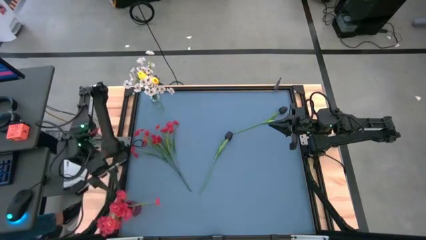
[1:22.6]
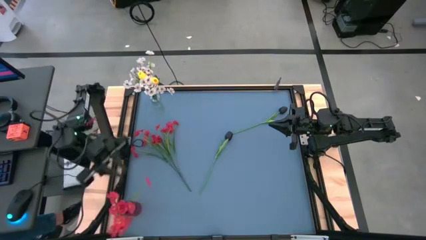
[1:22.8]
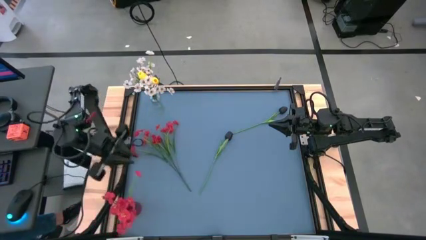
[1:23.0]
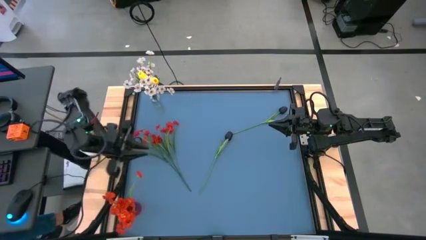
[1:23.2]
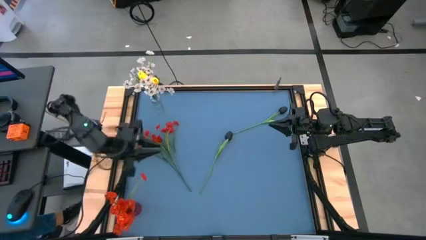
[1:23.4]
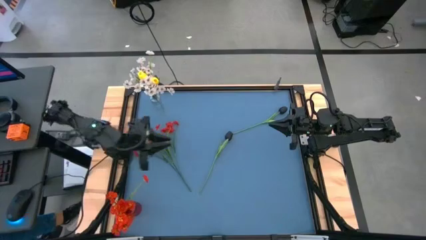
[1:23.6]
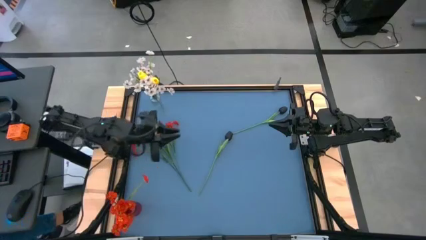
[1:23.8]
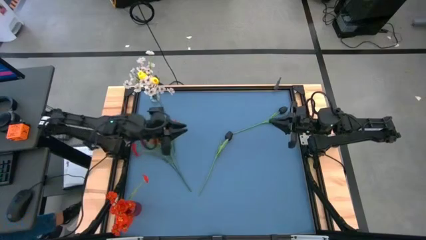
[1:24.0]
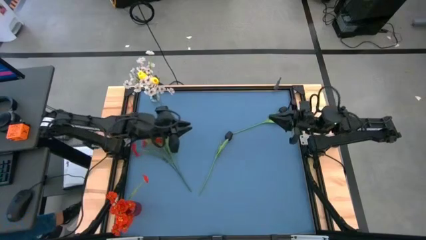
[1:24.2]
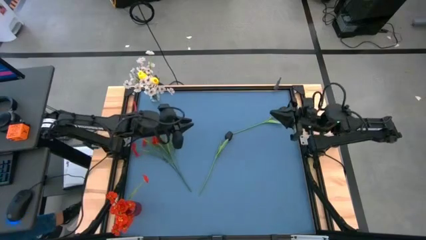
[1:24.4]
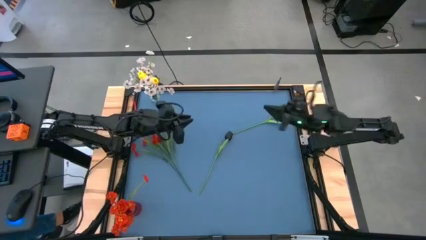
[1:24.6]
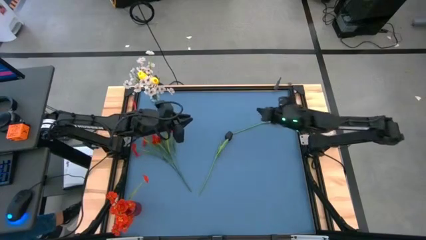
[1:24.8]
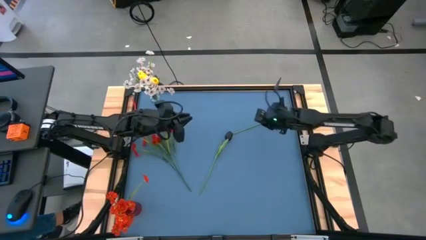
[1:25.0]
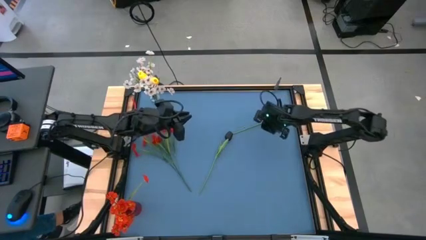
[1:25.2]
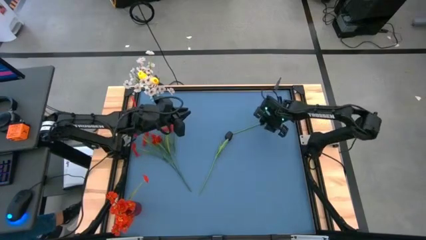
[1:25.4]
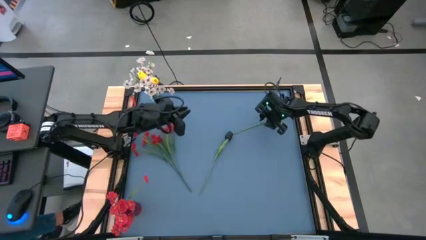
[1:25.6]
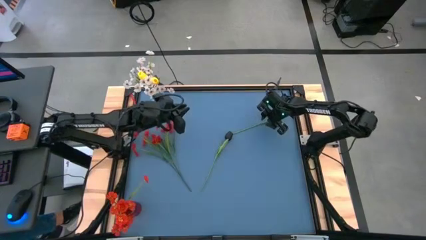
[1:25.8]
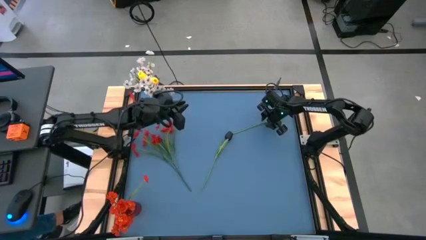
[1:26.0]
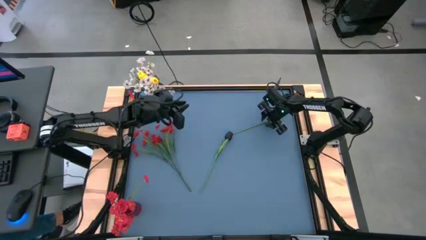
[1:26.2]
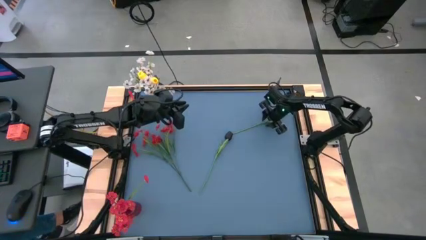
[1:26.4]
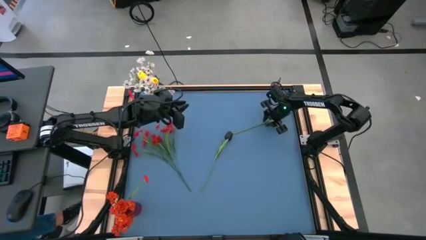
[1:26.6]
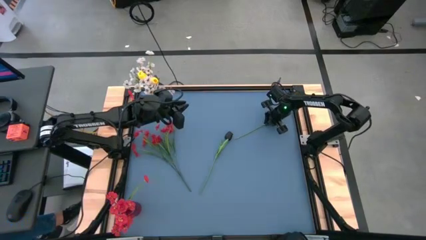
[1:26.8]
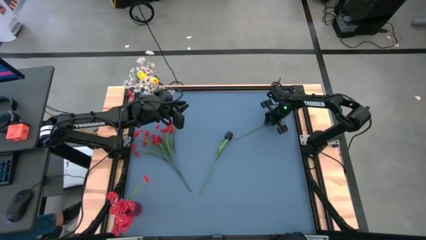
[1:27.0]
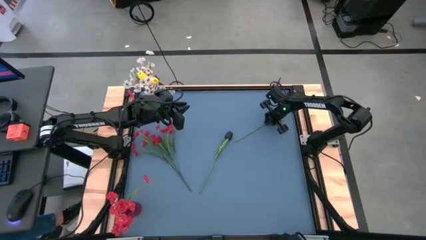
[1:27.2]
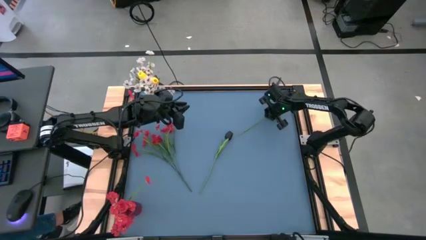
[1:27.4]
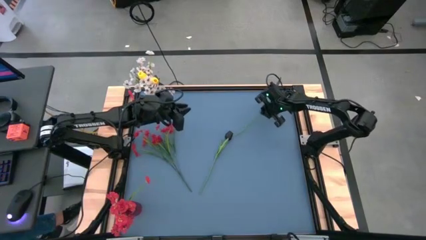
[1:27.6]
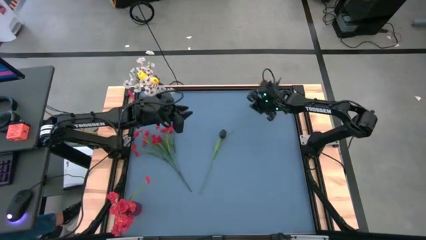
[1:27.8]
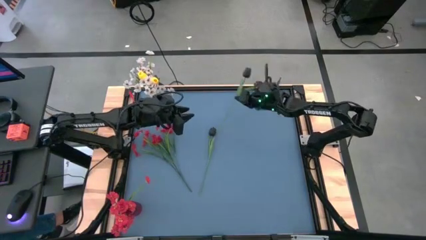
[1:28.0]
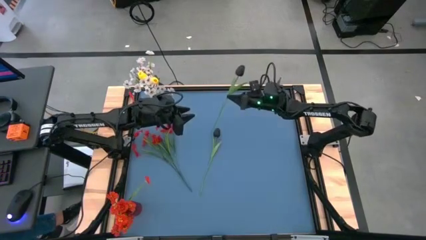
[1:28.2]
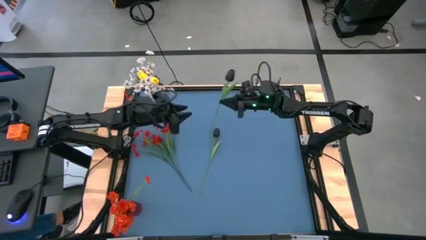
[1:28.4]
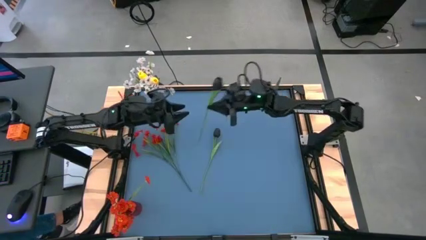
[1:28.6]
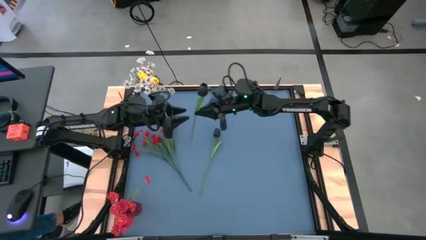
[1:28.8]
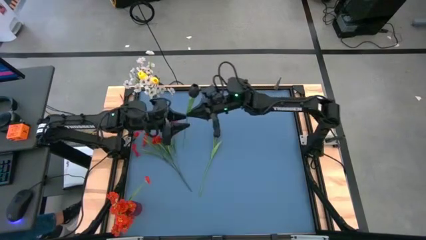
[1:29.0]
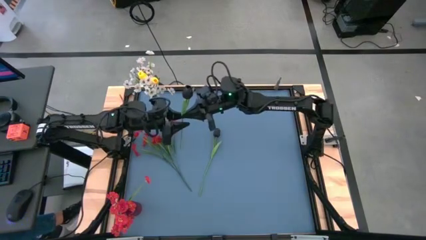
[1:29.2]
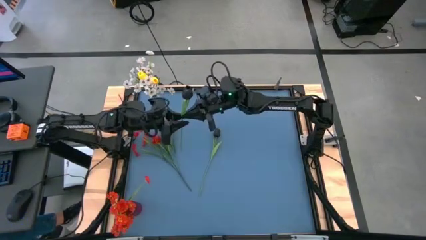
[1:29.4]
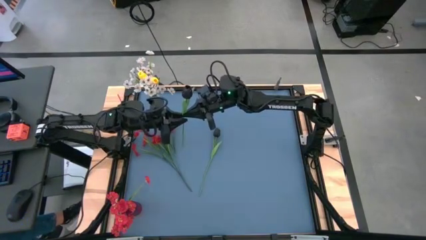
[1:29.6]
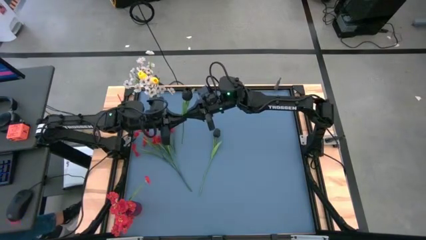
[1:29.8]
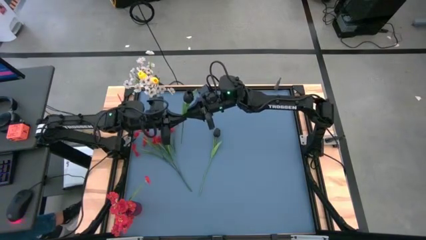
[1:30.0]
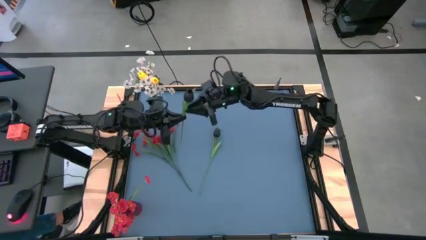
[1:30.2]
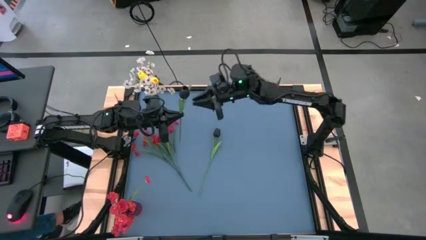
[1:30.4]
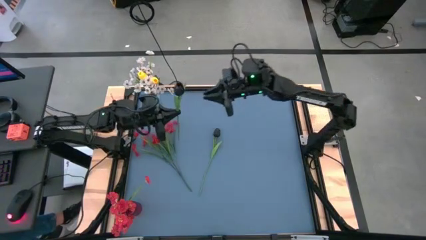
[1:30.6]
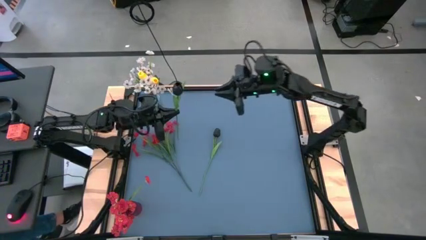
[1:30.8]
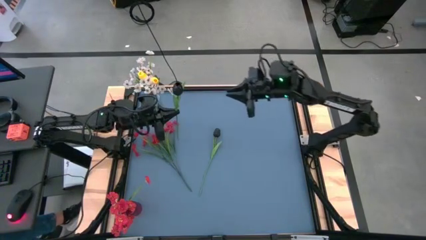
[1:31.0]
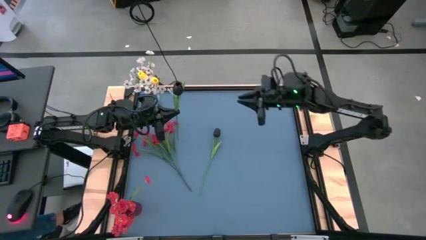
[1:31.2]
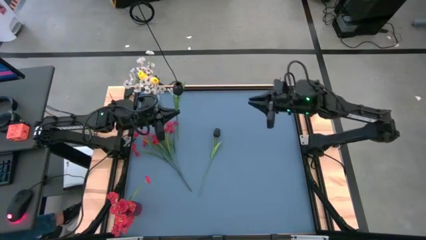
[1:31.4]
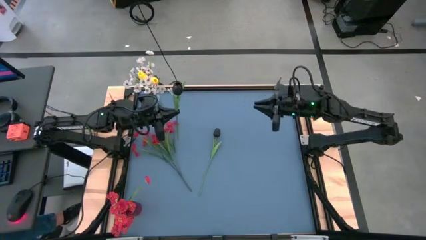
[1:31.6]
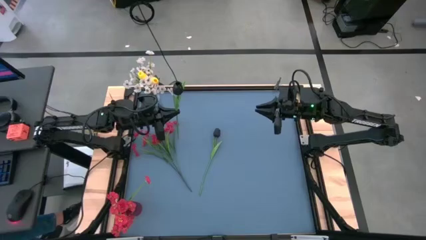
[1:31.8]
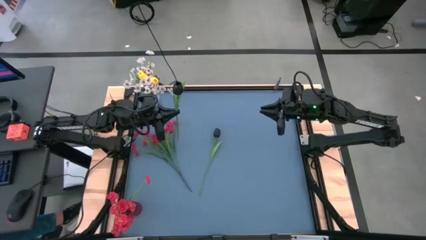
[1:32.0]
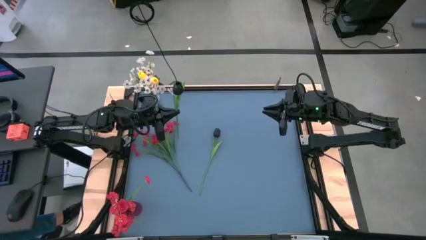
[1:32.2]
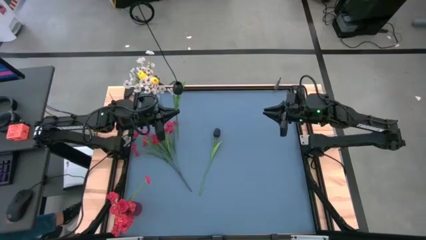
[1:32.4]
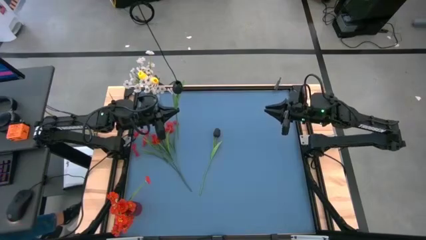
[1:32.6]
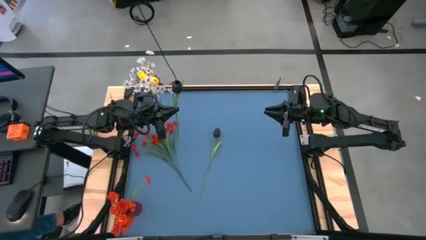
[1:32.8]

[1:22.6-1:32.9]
Task: Sort flowers into vase by color
Put the top black flower into the red vase

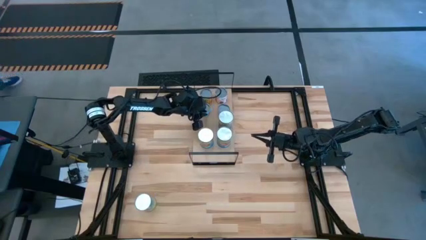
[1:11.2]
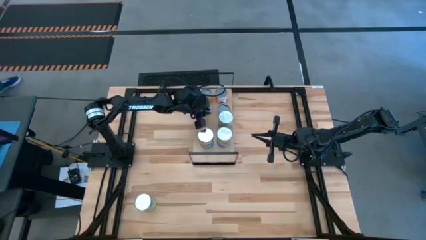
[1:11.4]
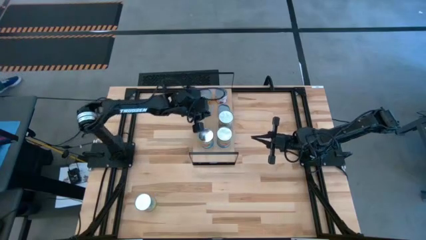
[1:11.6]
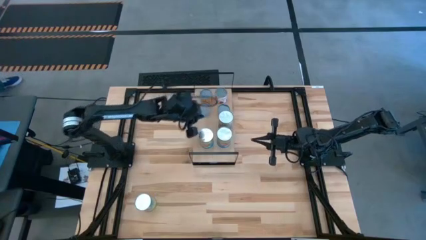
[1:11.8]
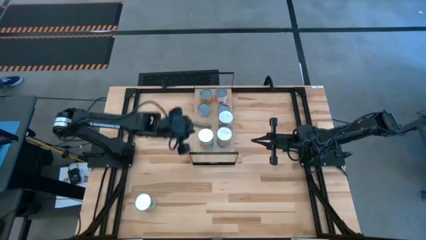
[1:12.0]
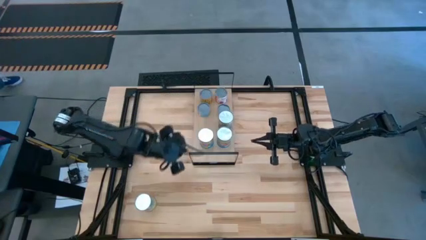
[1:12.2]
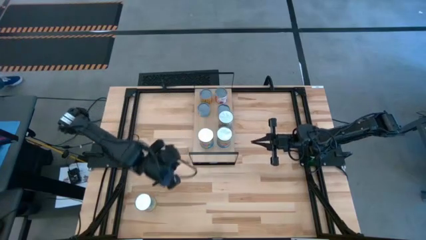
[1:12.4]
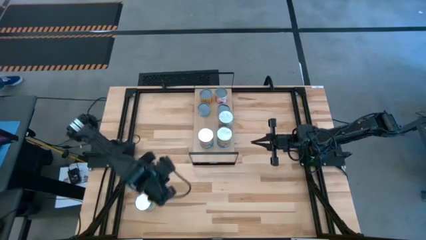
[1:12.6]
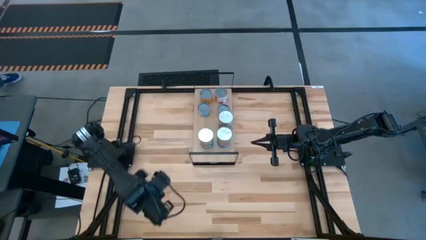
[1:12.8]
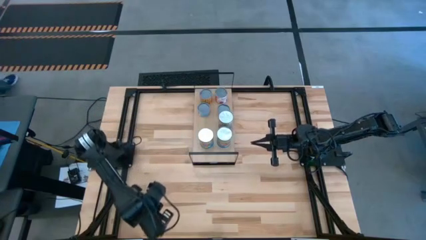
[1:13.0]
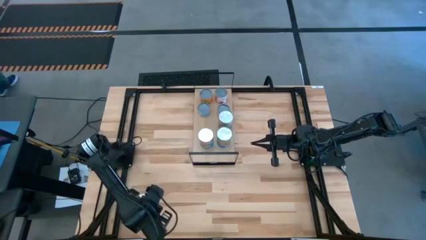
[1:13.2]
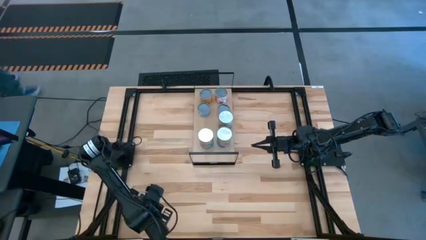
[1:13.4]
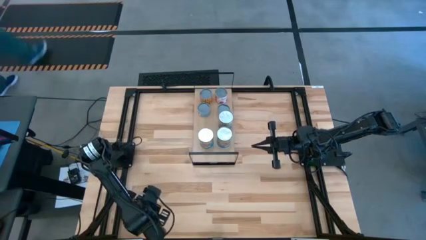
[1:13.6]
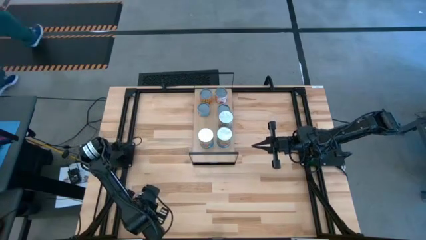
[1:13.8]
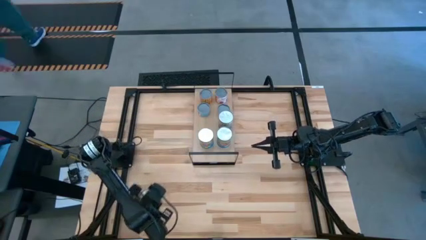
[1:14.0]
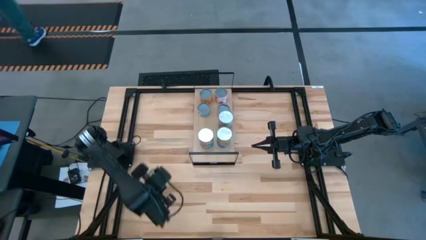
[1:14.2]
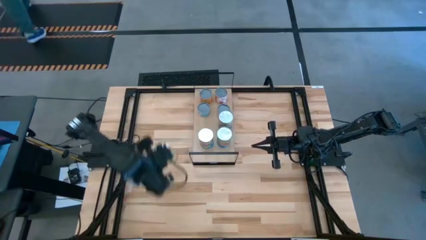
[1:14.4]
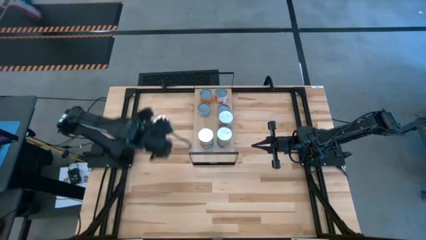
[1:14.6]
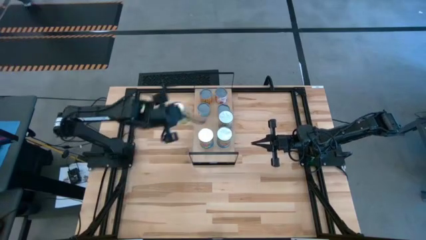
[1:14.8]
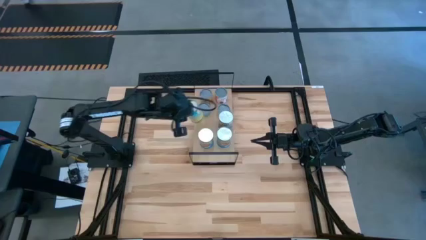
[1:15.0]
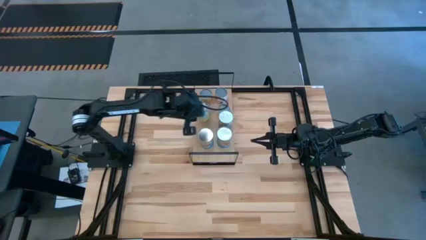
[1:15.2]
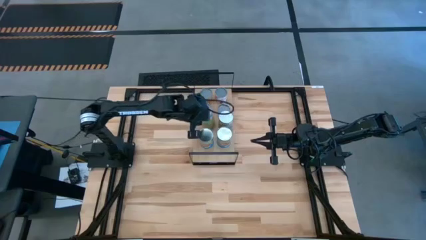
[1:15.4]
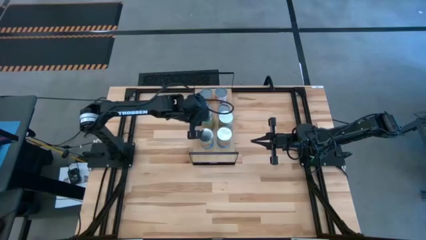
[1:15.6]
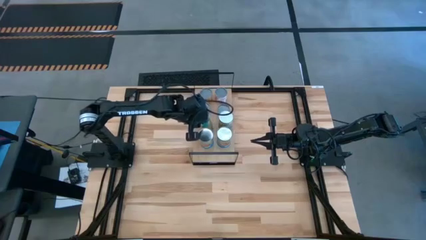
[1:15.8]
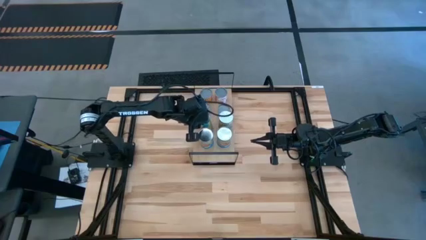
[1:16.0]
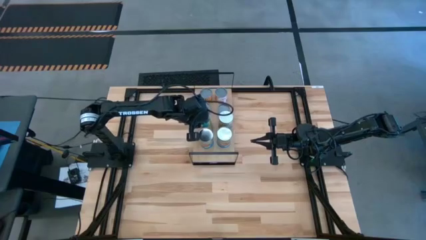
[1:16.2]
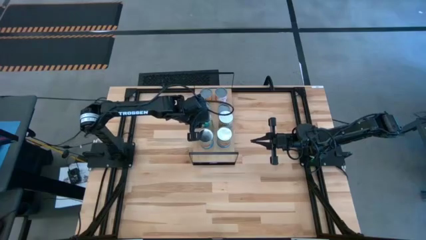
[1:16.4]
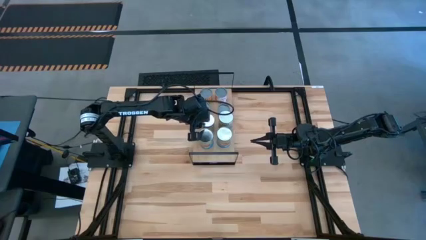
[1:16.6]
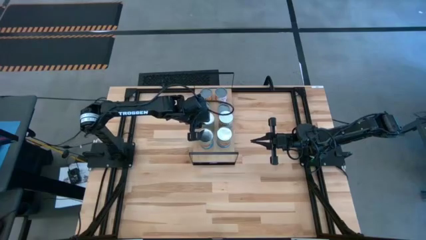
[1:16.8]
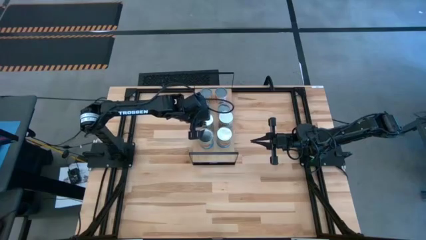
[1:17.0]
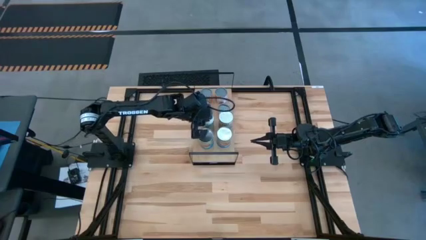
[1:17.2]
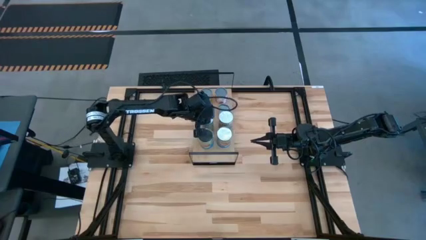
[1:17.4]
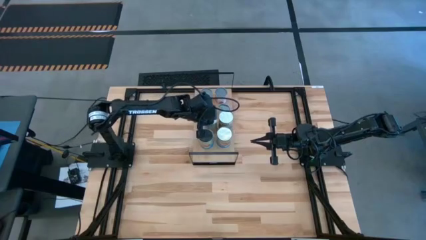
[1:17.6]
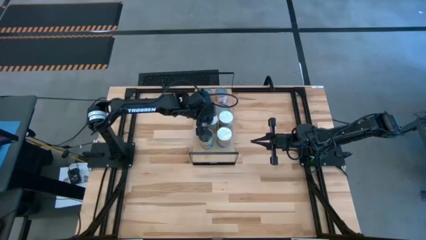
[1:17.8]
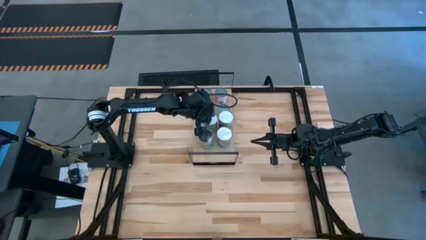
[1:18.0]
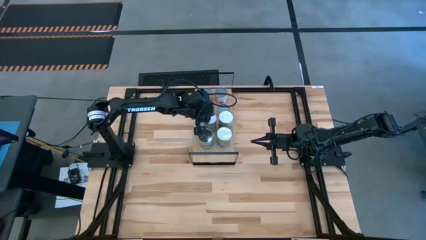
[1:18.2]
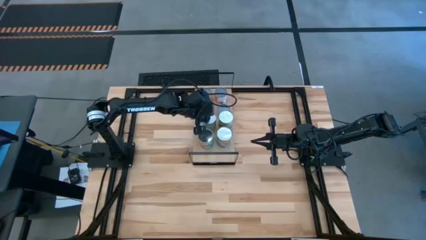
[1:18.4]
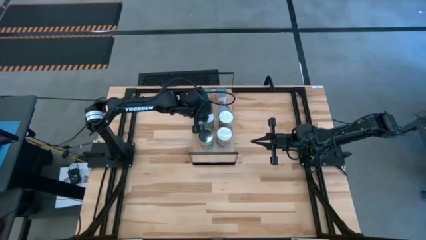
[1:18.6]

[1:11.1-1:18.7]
Task: Pick and place cans onto a shelf
Put the canned carrots on the shelf and align them with the other cans
